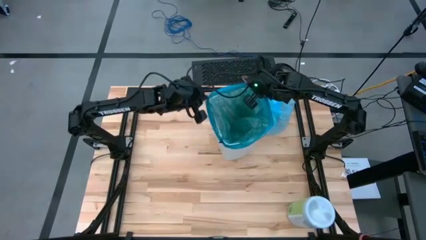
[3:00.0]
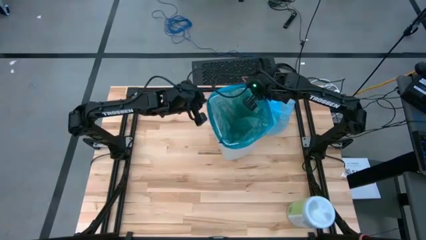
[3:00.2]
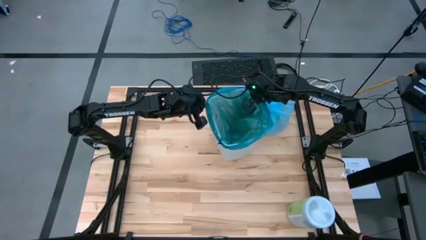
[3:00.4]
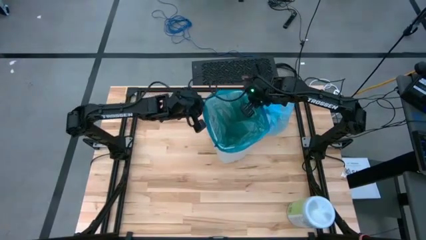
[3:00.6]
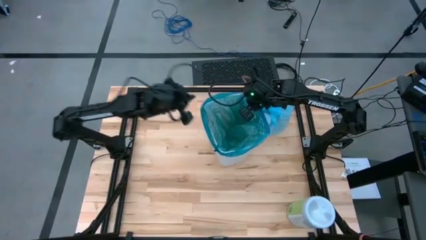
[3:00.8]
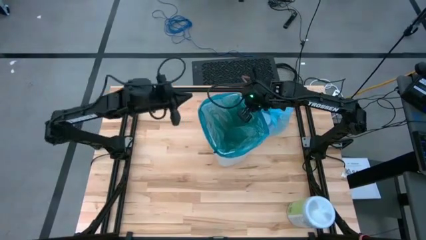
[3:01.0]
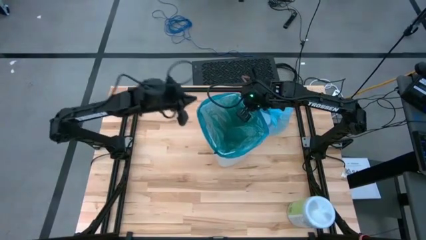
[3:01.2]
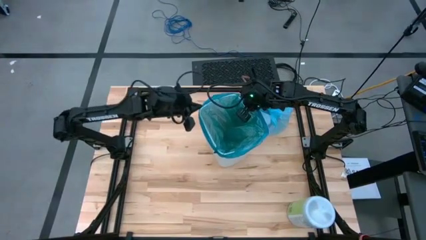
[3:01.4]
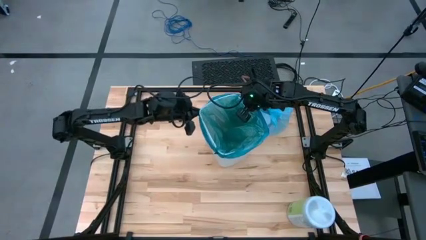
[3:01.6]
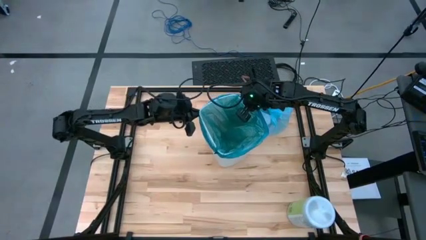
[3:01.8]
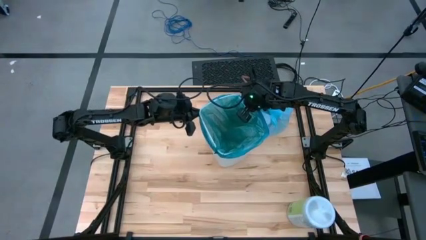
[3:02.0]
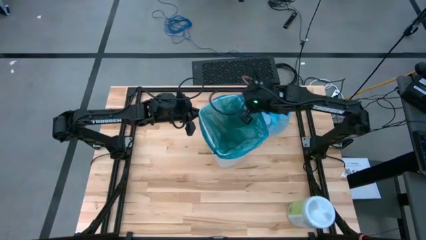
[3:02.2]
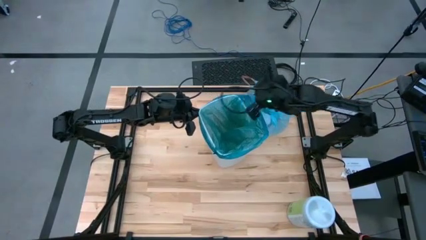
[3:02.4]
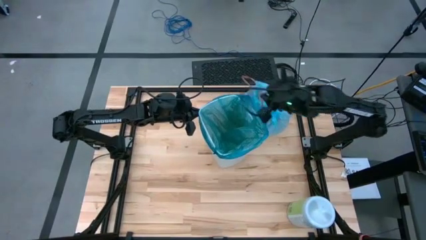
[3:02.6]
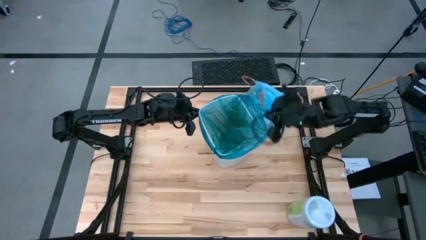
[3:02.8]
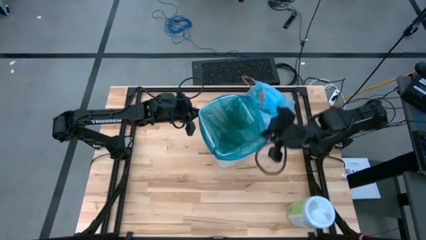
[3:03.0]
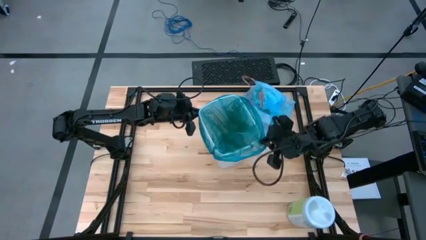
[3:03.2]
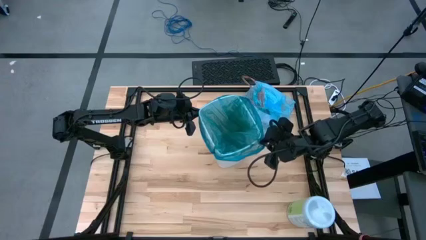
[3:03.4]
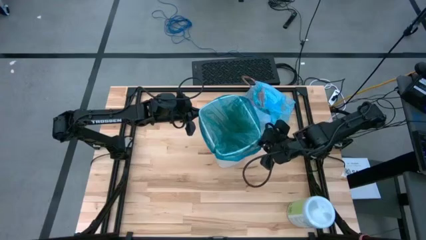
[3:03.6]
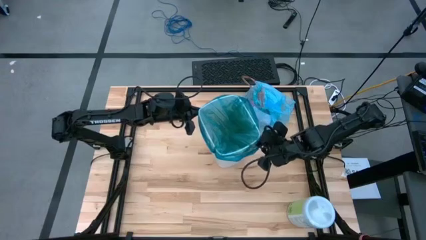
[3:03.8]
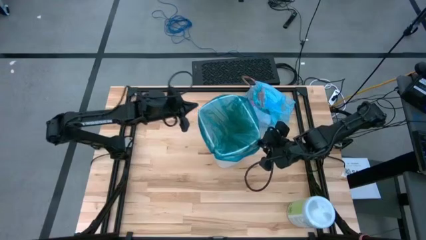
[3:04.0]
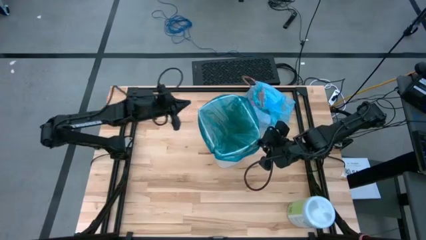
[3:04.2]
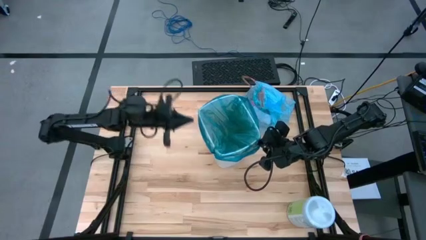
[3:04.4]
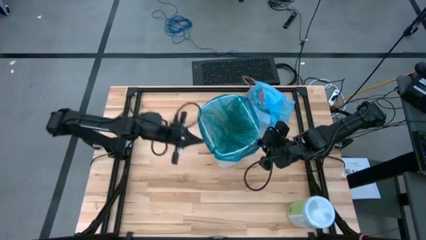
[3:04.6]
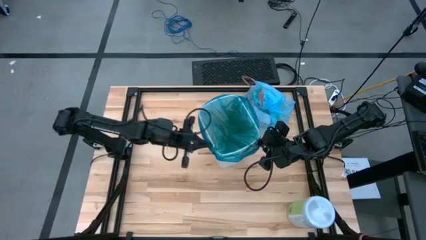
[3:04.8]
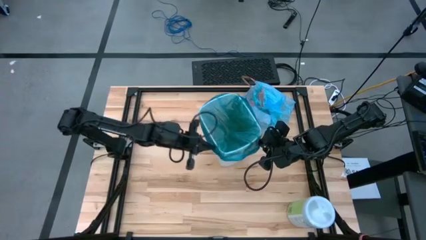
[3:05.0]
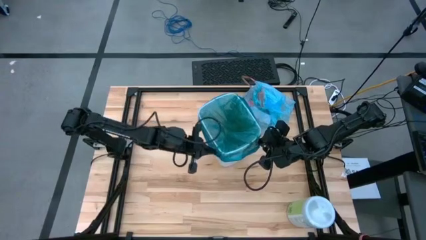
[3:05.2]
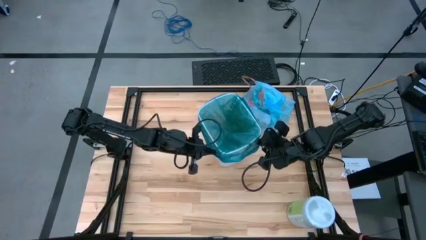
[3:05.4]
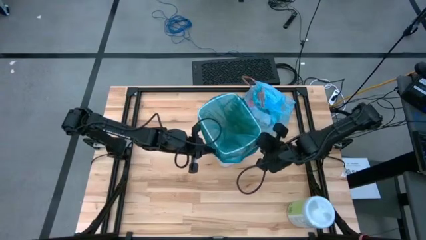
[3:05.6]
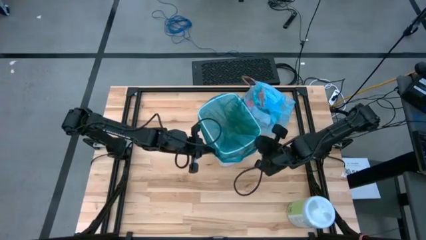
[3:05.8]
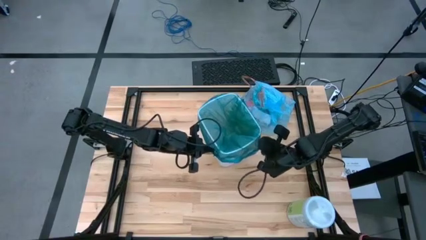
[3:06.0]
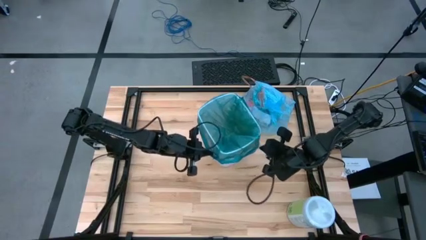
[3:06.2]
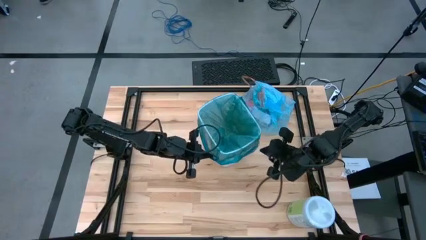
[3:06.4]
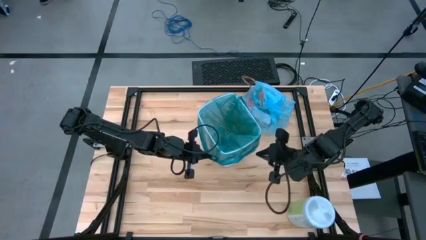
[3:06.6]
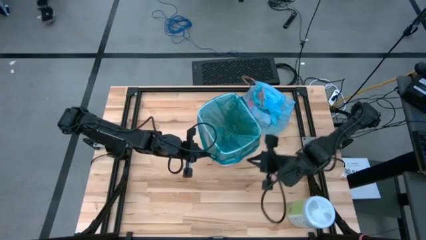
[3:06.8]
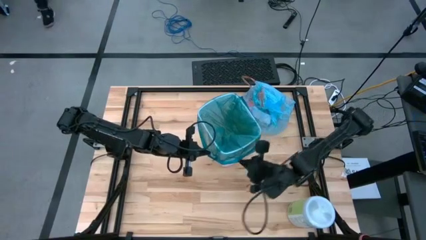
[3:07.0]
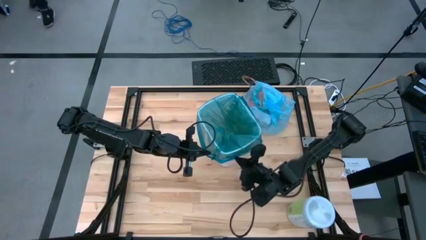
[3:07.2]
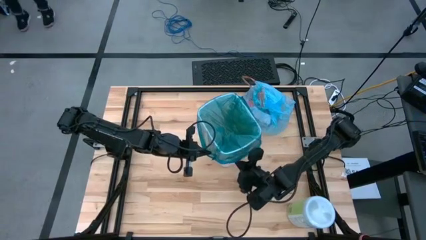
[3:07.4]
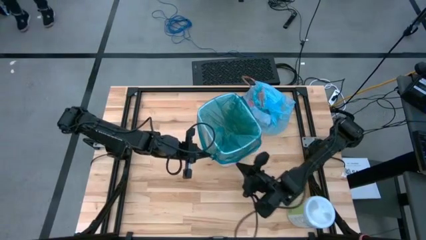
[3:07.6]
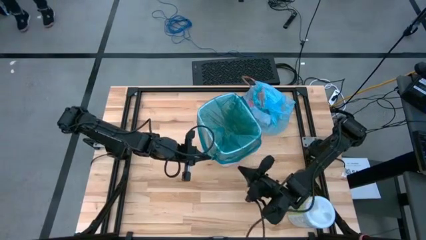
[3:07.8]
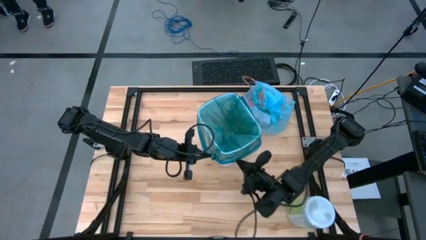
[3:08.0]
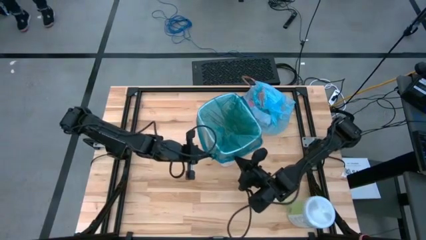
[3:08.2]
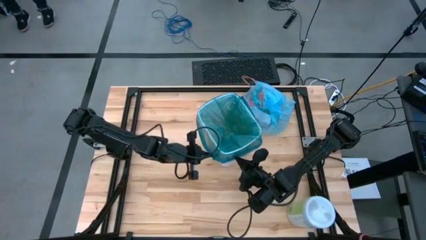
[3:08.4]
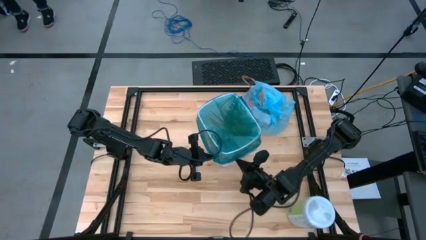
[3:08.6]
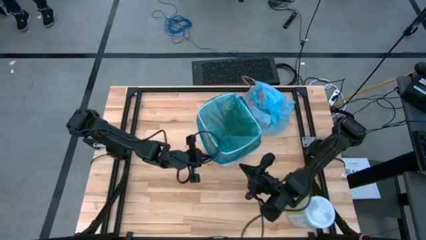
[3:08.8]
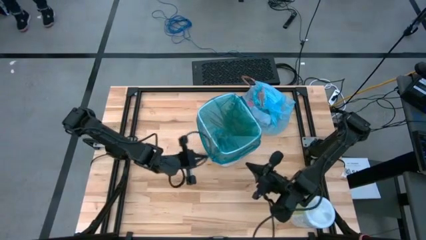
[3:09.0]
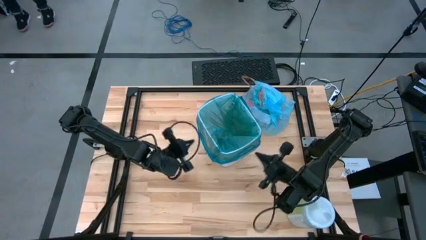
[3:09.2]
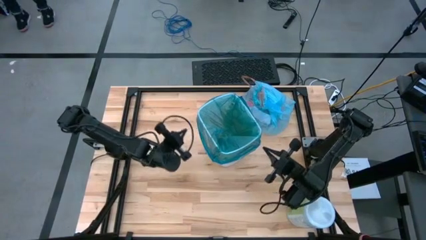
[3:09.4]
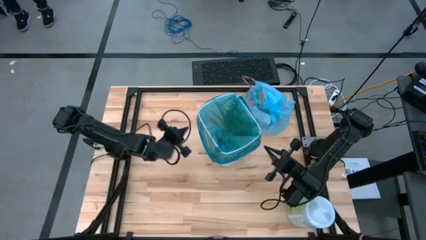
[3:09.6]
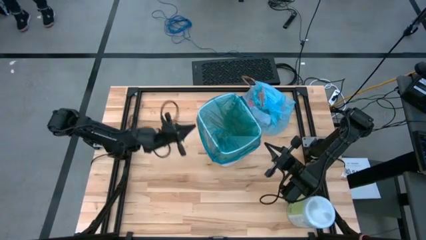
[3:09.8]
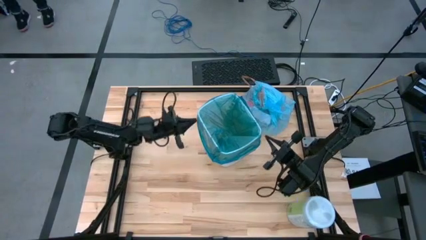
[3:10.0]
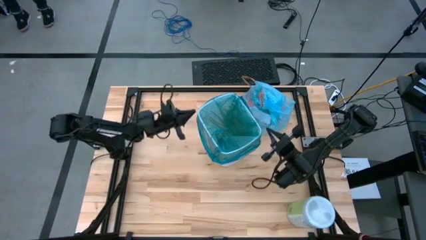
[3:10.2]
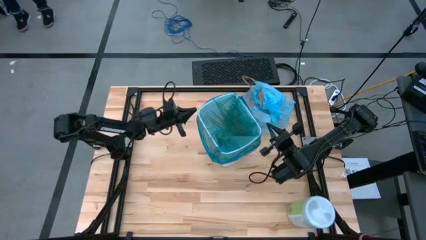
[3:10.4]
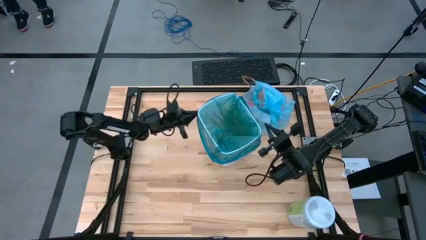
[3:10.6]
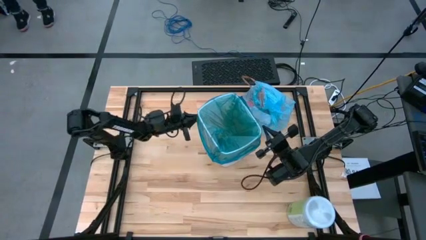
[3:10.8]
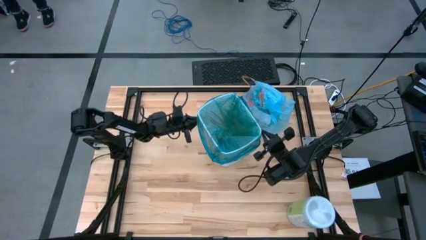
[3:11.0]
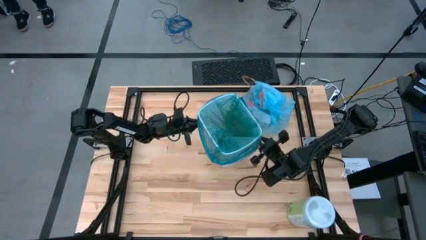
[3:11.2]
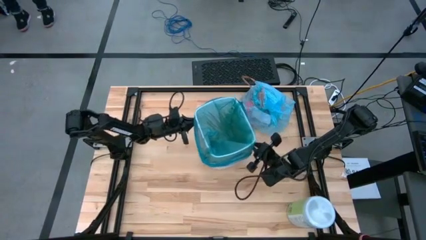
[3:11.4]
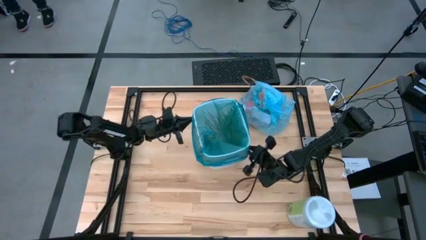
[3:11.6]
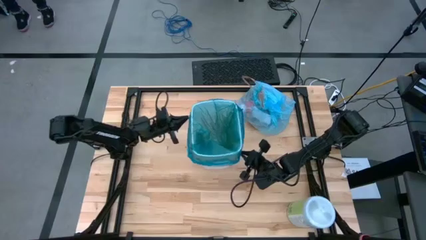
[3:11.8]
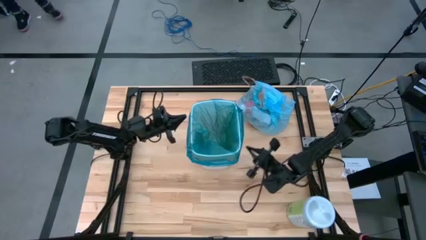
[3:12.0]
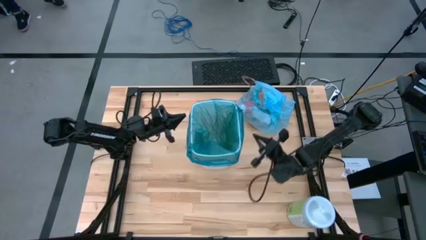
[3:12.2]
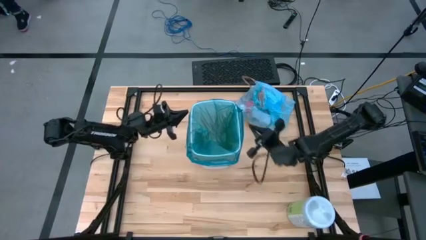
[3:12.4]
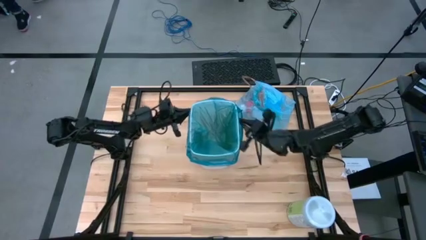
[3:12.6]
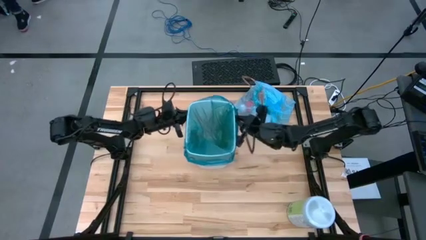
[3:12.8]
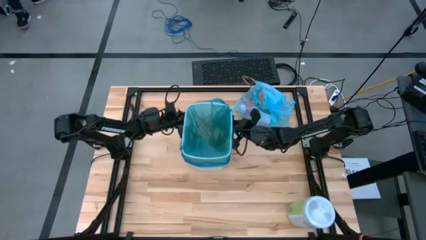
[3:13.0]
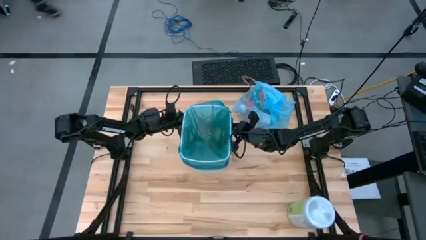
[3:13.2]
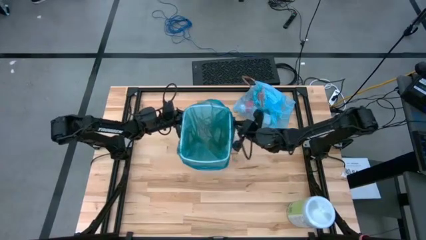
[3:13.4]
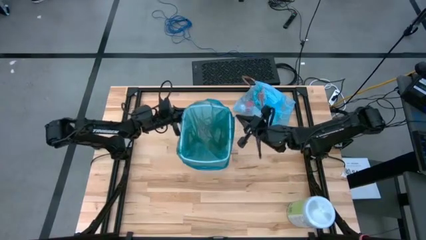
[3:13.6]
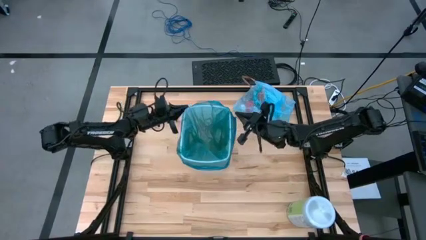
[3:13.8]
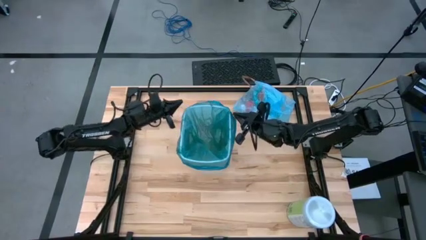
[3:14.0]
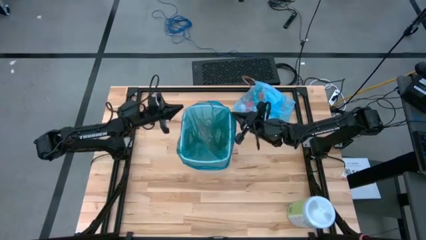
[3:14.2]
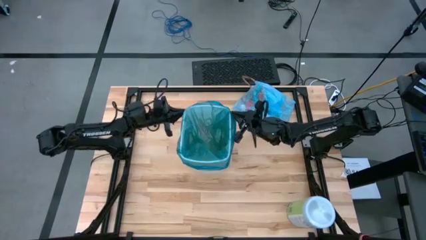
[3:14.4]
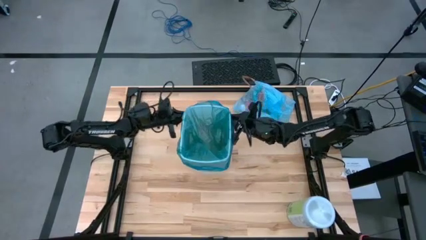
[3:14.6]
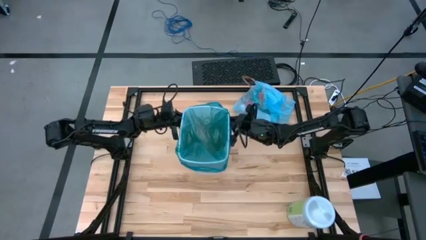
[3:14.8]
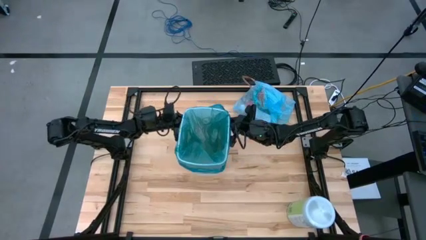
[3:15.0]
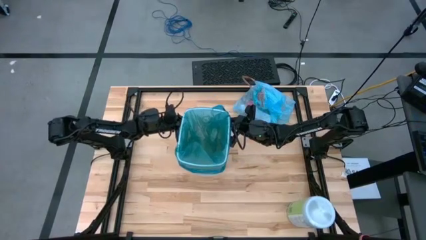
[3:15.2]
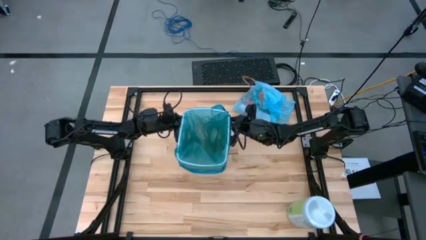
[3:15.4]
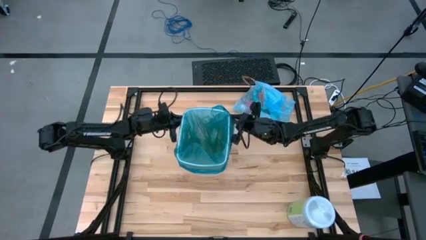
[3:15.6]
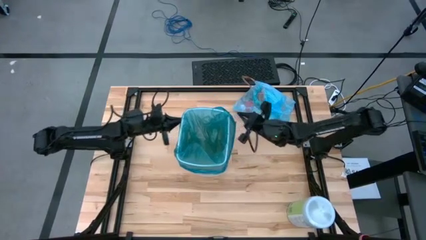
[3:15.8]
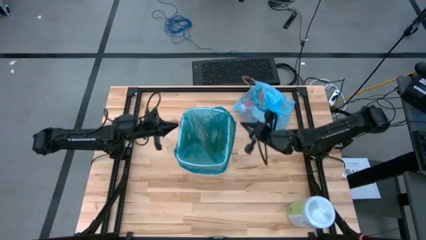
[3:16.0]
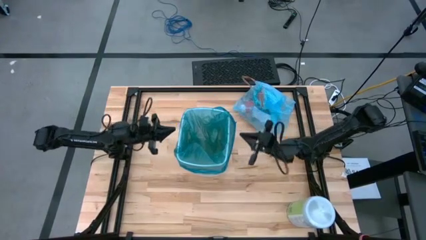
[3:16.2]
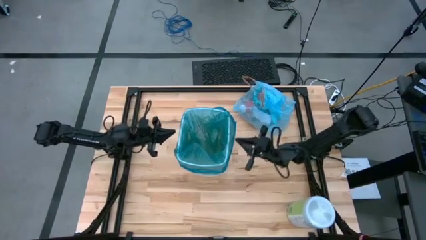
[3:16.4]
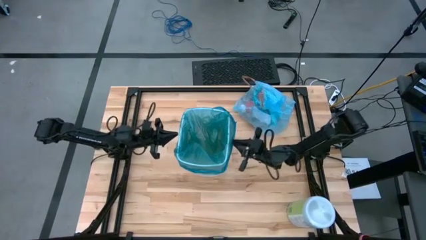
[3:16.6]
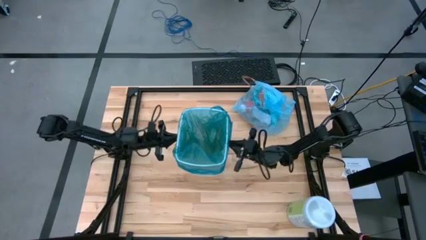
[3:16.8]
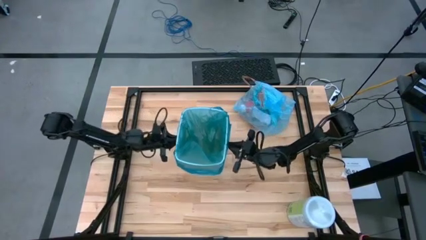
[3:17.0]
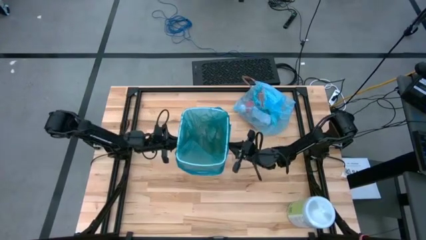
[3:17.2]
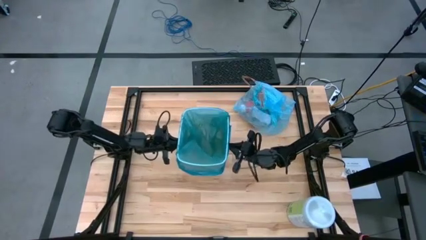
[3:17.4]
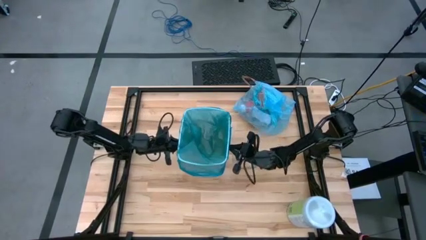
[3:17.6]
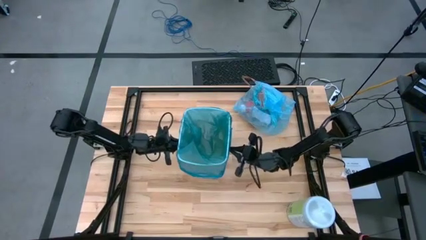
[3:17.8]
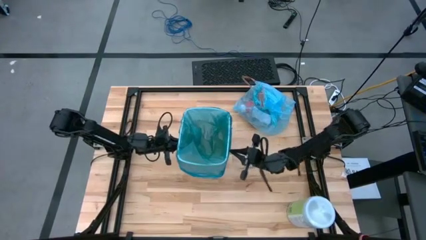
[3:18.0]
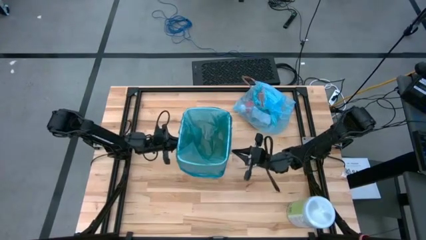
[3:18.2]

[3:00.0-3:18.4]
Task: place trash/remove bag and relplace
Insert a blue trash bag into the trash bin
